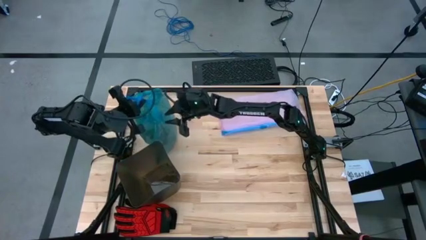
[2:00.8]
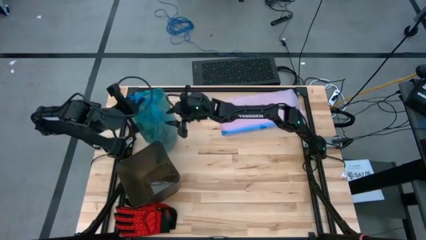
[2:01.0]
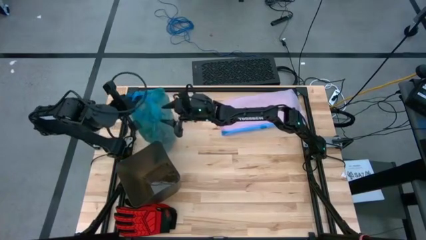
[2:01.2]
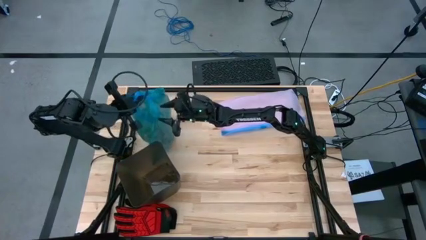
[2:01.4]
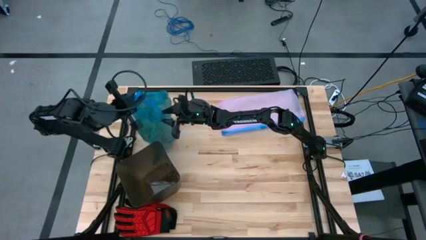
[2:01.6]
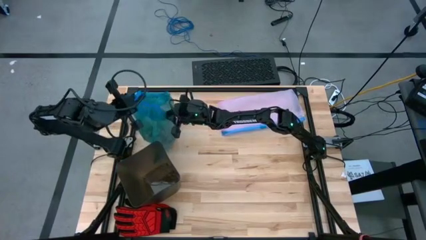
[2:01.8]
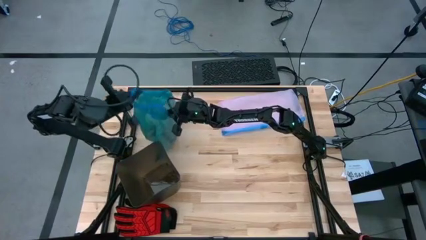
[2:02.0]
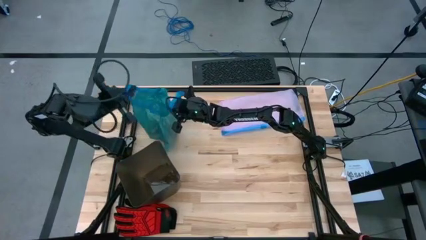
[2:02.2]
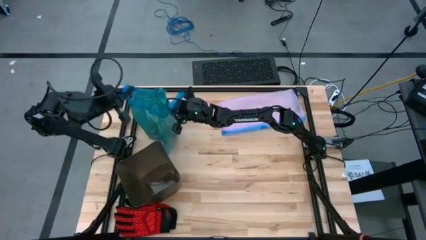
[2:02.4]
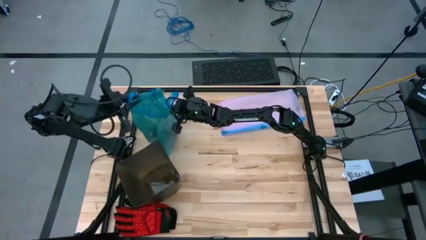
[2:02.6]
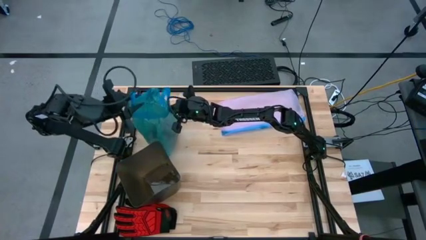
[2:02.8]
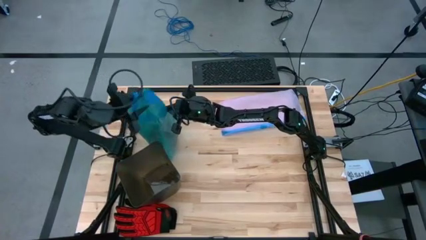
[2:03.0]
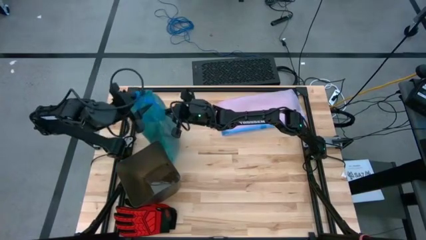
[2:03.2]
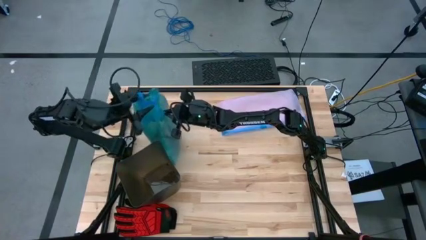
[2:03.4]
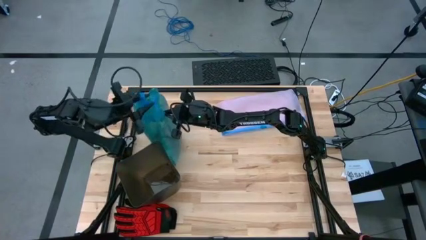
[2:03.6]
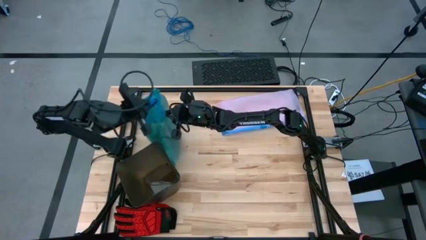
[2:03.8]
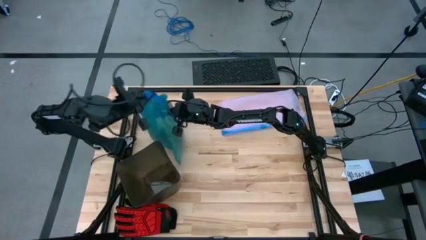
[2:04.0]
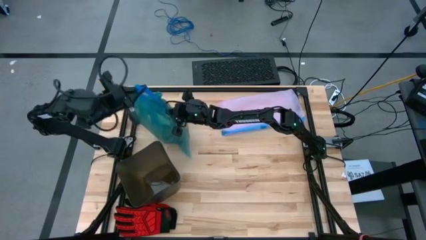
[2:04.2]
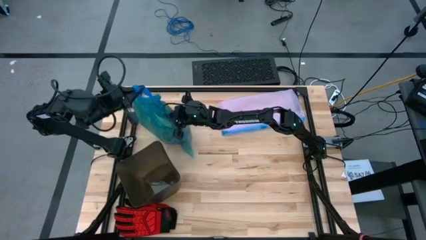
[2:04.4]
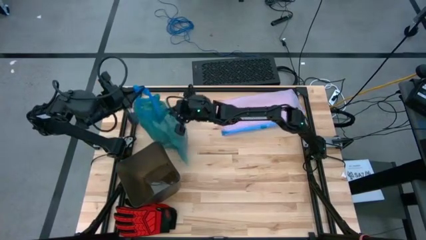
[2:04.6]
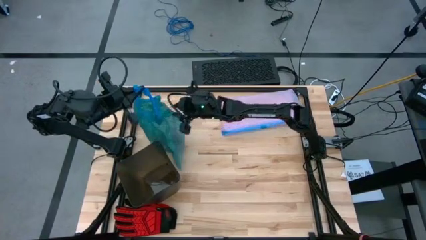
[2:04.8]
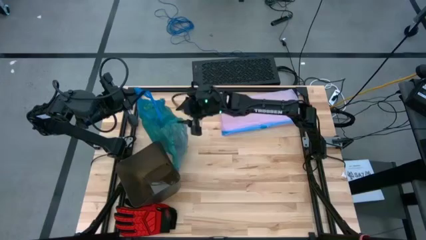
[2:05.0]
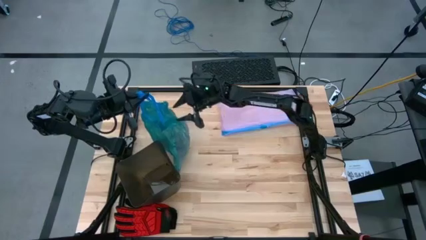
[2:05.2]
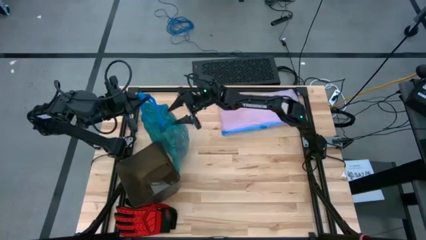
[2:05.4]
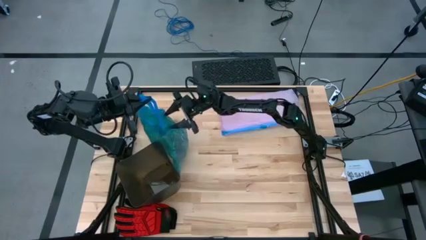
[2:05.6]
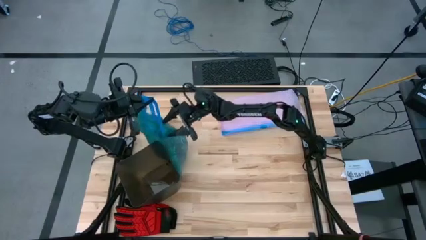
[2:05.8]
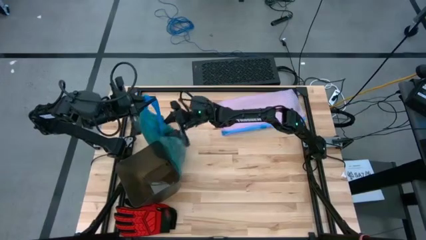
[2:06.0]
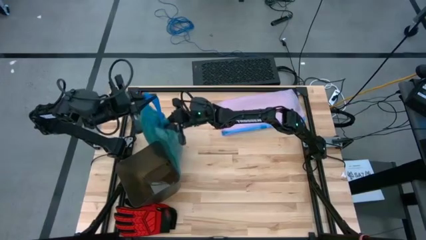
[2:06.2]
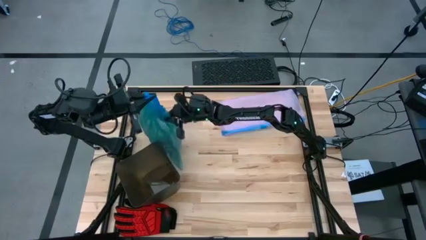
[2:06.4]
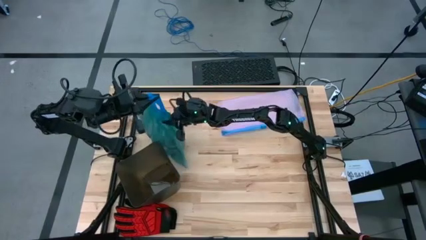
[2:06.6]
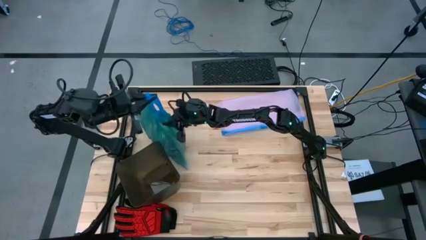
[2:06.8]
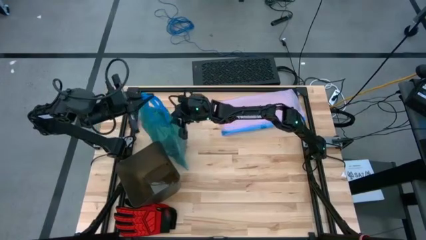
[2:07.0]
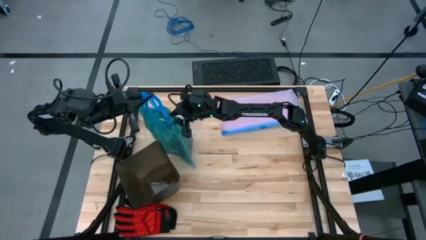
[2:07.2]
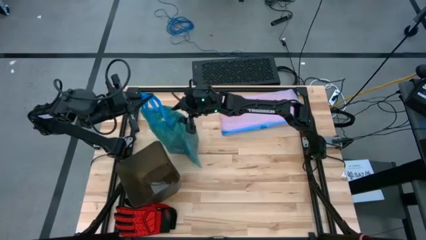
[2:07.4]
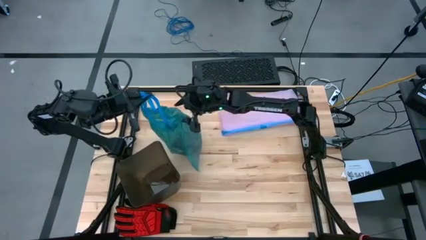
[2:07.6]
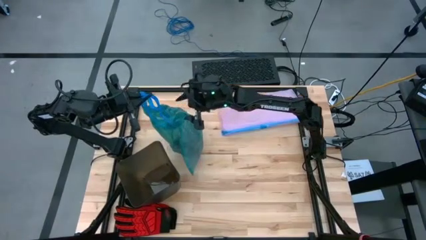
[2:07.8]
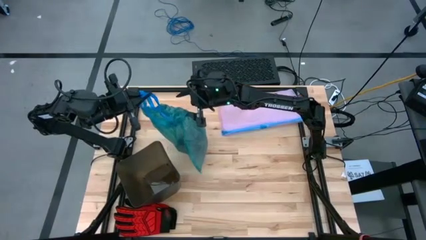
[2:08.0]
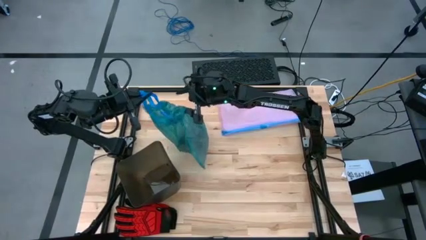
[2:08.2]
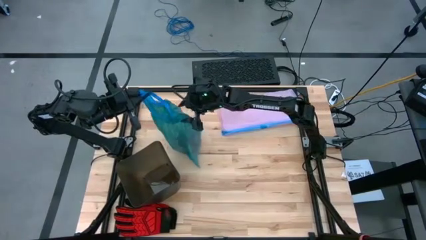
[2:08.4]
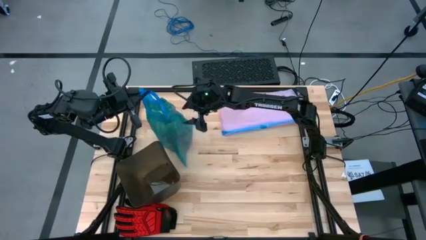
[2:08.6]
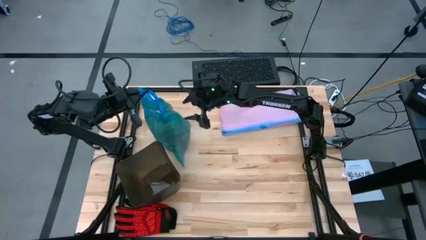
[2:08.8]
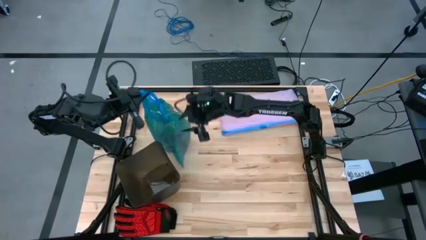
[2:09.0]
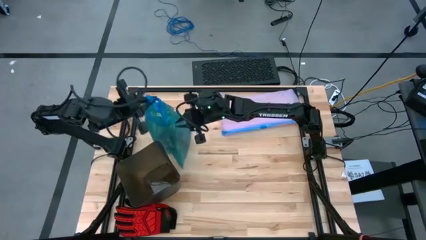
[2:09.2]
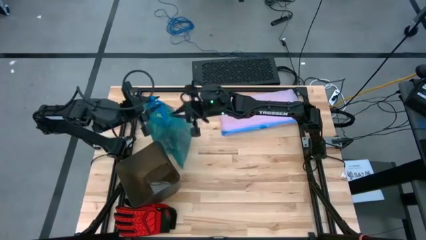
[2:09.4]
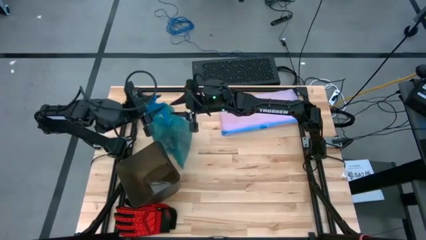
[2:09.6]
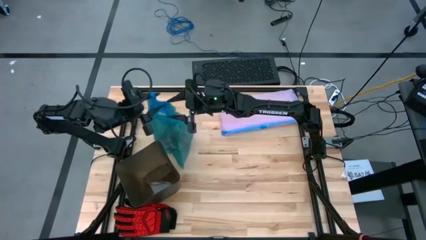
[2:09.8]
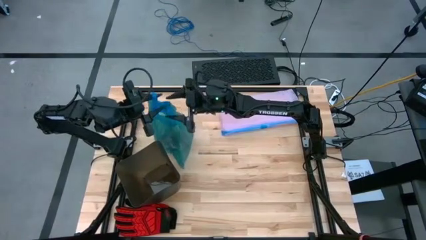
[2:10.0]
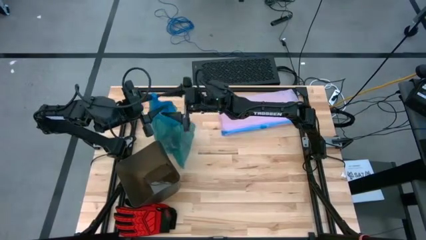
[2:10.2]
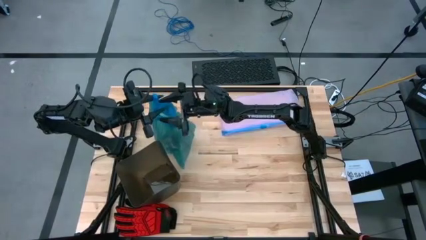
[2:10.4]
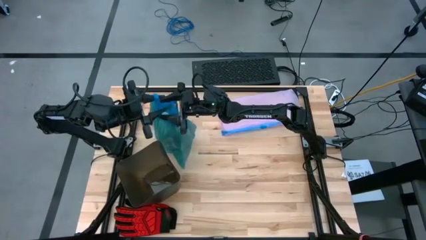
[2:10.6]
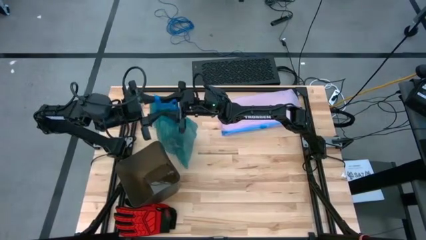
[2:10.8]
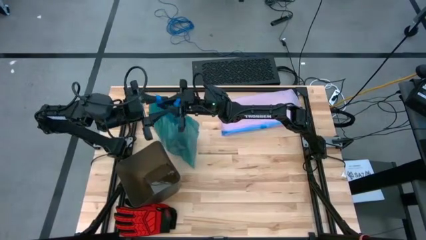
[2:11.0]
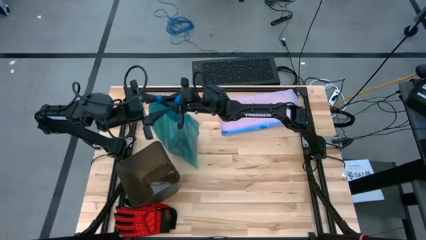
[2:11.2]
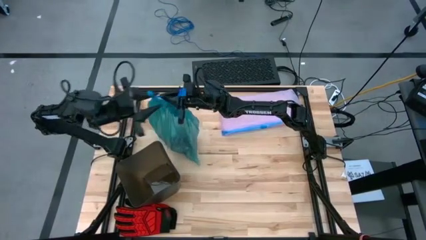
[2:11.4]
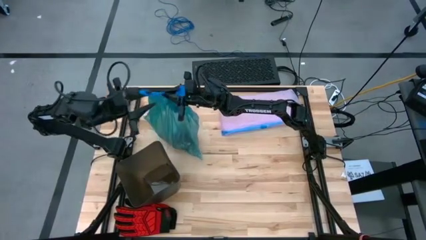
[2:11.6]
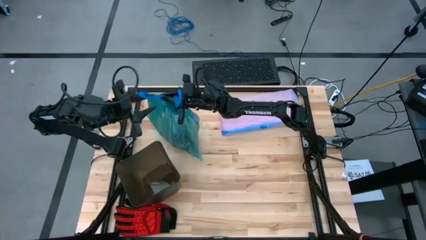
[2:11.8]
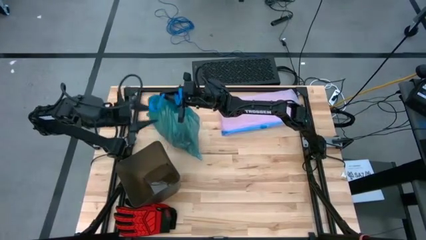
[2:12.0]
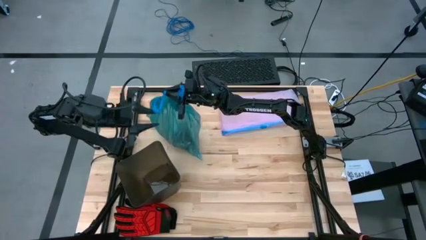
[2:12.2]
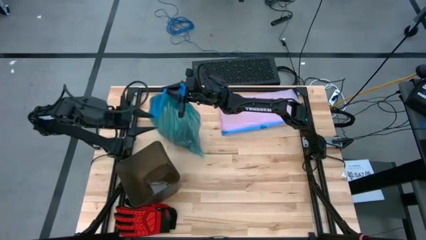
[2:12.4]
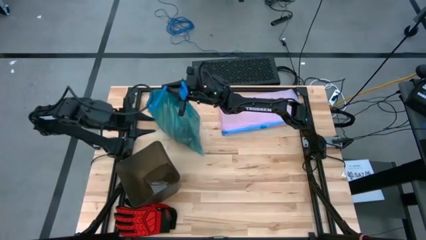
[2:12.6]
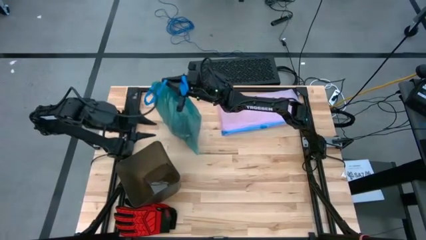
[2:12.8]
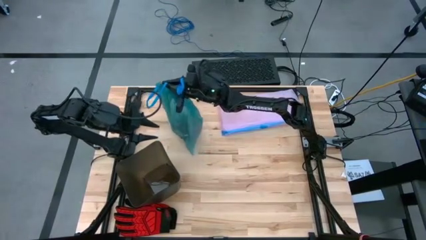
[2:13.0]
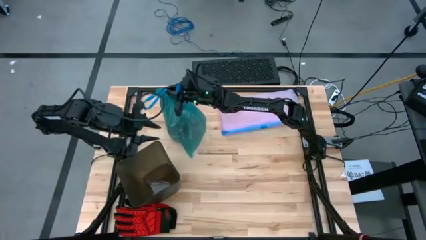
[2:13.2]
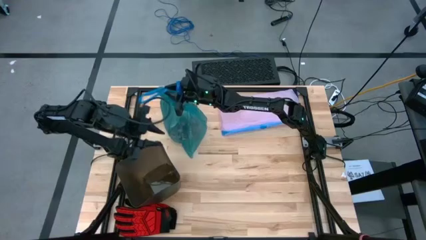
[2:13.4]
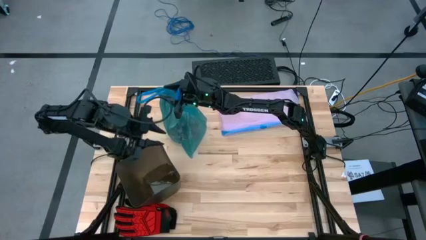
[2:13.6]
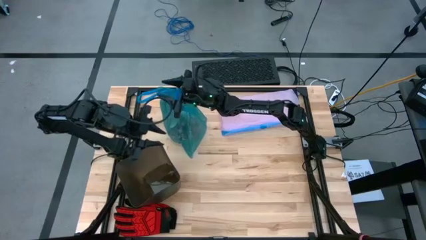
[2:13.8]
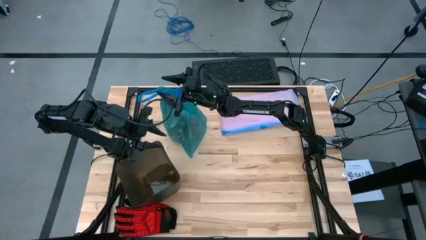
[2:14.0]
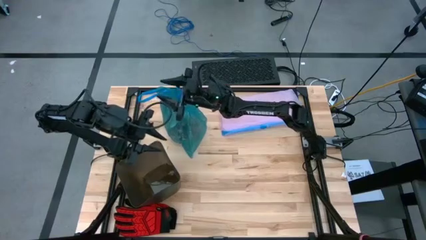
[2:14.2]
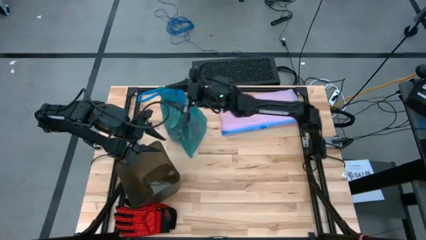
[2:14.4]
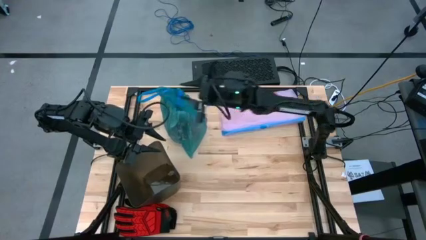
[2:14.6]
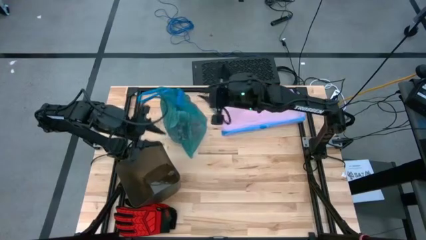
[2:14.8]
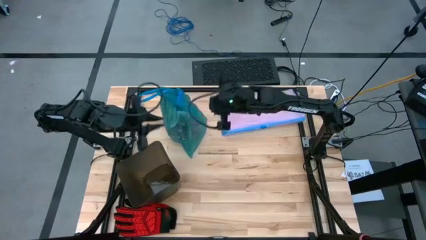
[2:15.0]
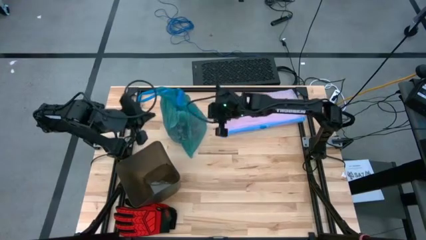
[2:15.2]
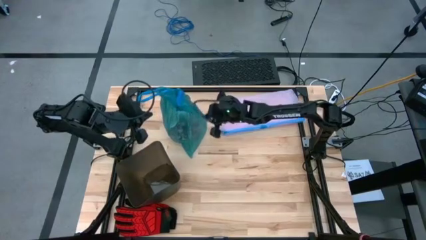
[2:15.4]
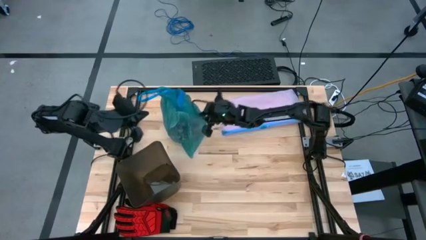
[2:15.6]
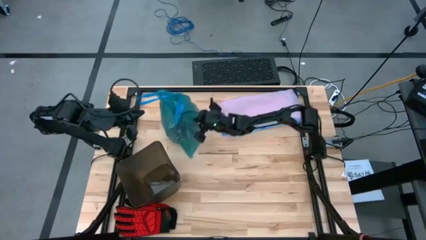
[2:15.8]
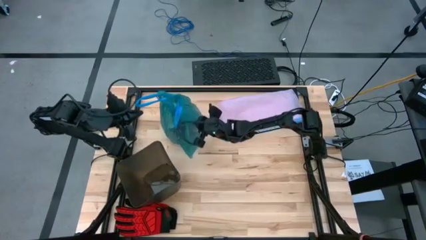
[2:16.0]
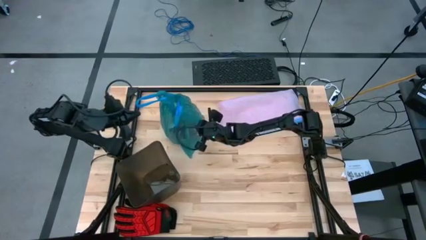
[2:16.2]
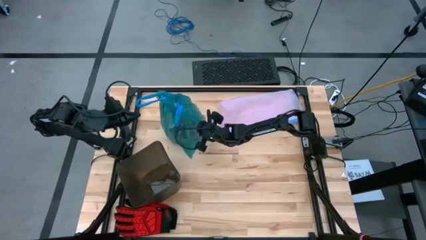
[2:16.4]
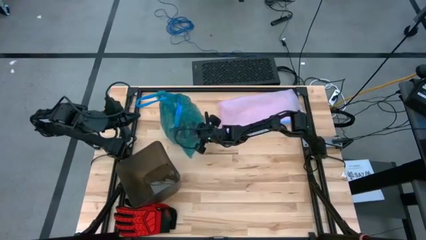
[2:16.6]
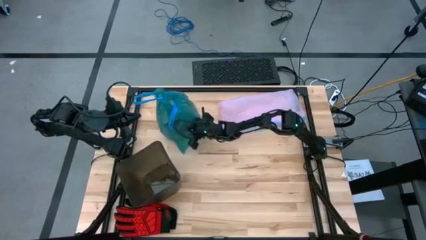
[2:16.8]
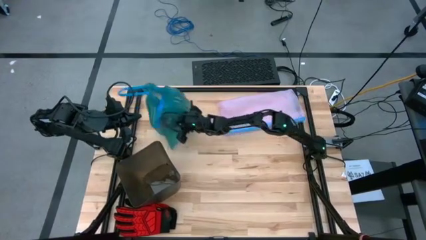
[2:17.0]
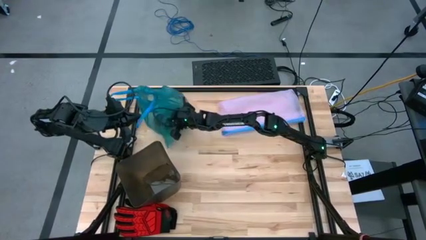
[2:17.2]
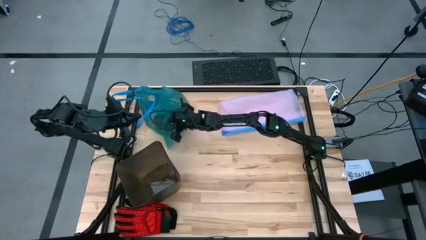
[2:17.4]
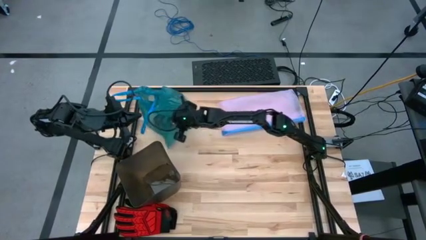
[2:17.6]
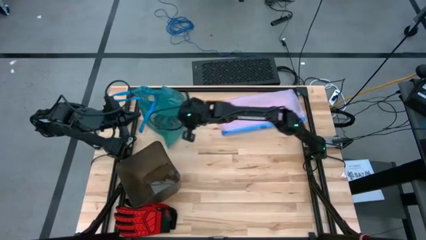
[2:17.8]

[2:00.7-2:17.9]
Task: place trash/remove bag and relplace
Remove the trash bag from the trash bin
